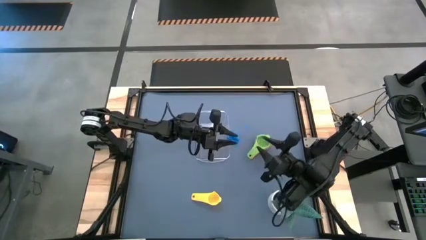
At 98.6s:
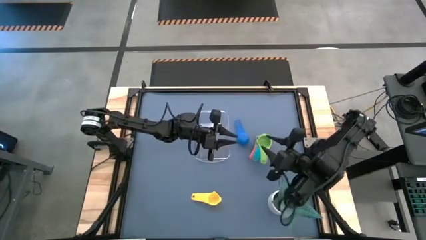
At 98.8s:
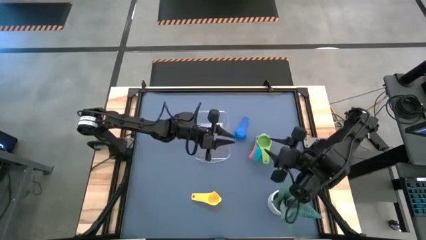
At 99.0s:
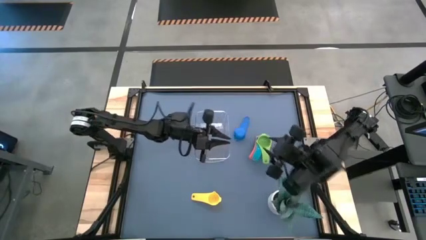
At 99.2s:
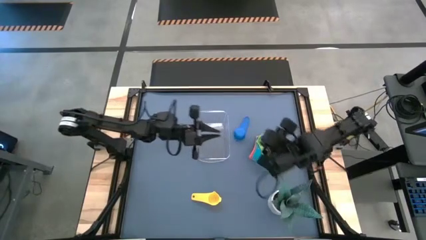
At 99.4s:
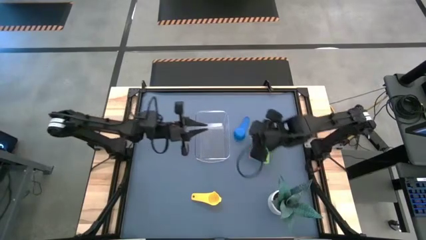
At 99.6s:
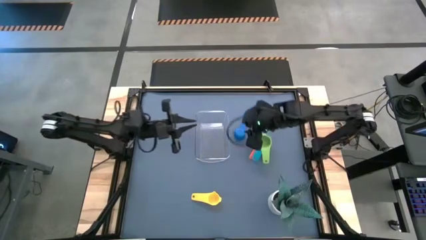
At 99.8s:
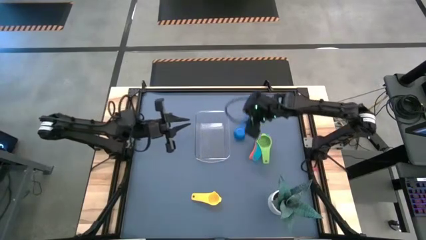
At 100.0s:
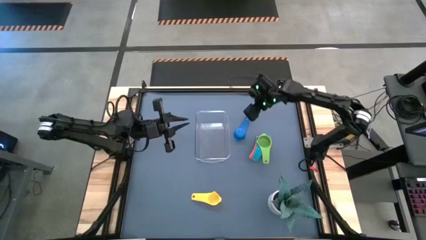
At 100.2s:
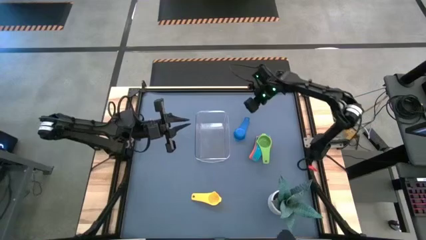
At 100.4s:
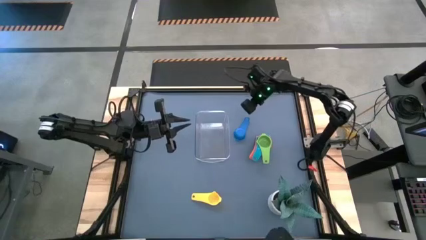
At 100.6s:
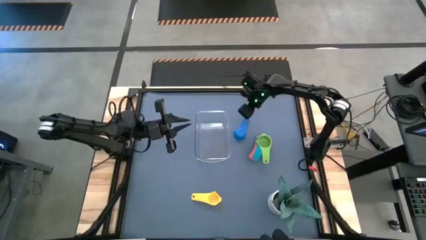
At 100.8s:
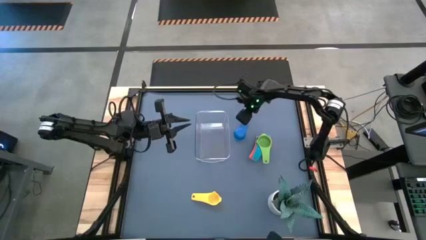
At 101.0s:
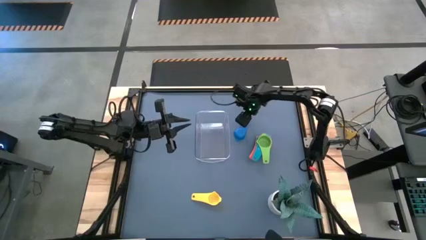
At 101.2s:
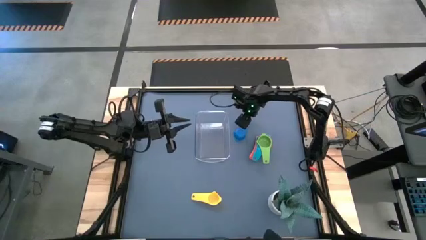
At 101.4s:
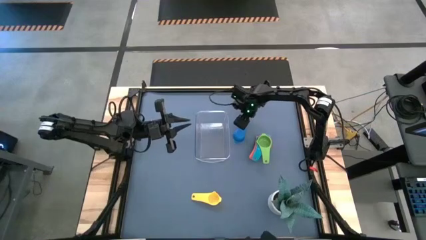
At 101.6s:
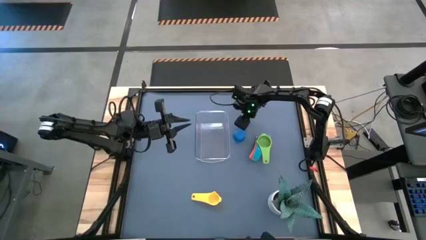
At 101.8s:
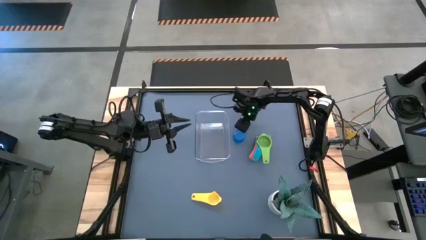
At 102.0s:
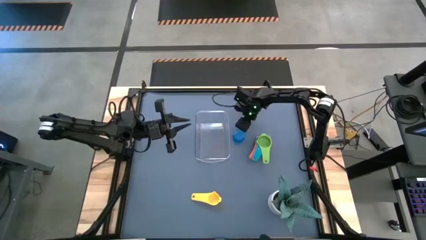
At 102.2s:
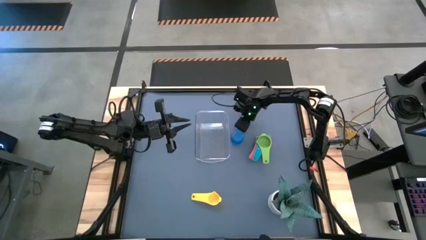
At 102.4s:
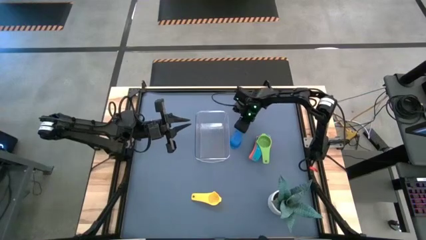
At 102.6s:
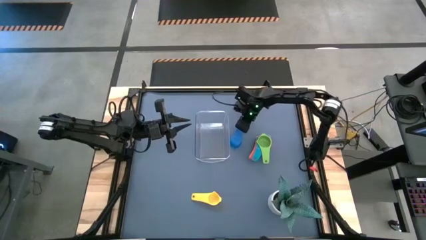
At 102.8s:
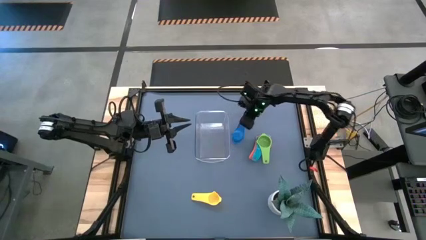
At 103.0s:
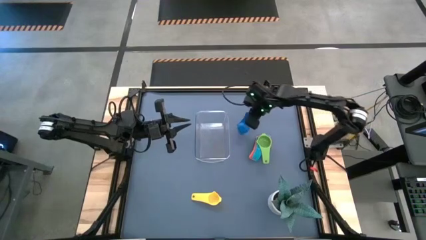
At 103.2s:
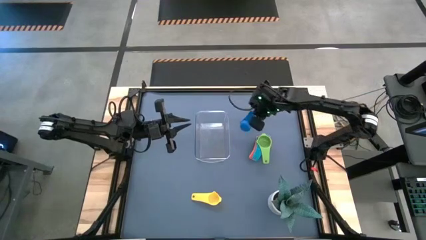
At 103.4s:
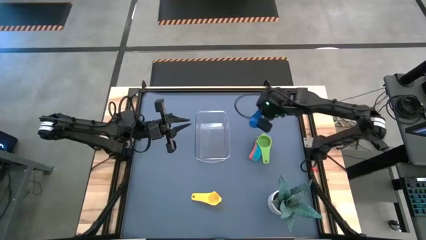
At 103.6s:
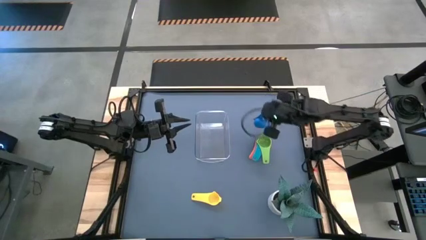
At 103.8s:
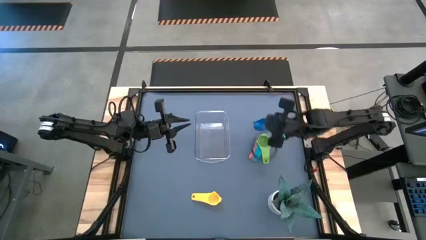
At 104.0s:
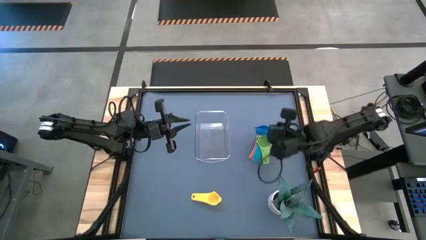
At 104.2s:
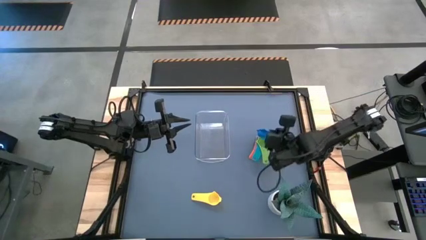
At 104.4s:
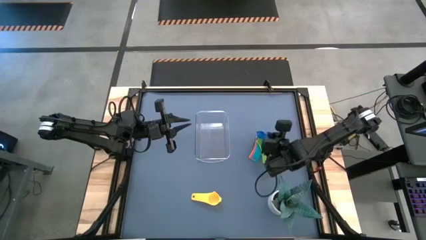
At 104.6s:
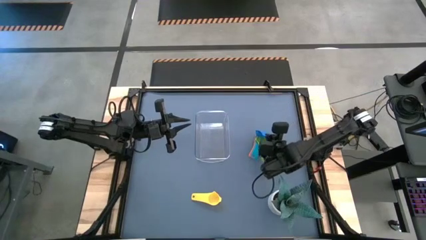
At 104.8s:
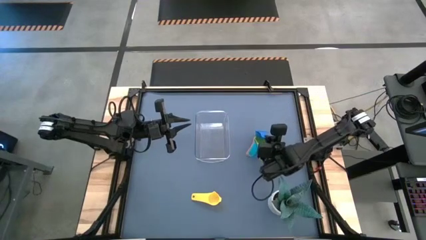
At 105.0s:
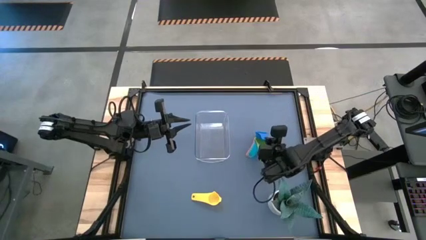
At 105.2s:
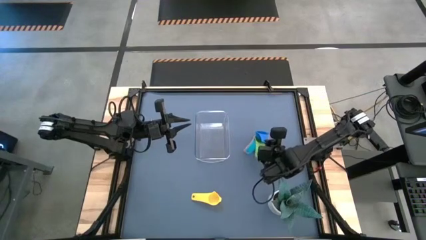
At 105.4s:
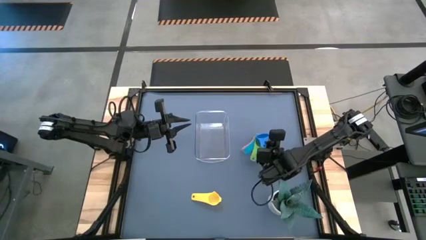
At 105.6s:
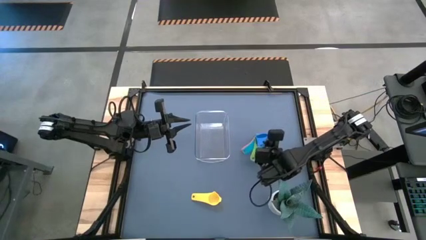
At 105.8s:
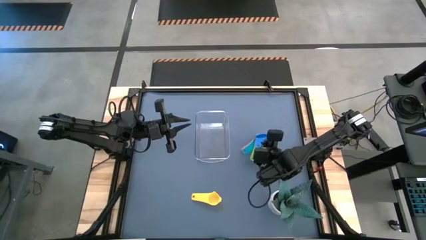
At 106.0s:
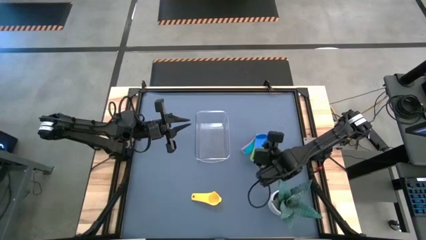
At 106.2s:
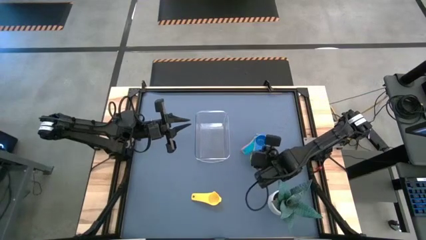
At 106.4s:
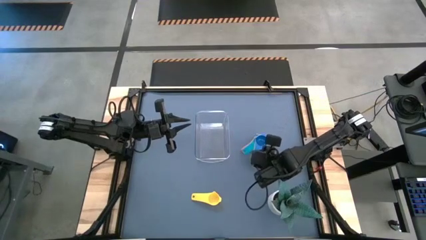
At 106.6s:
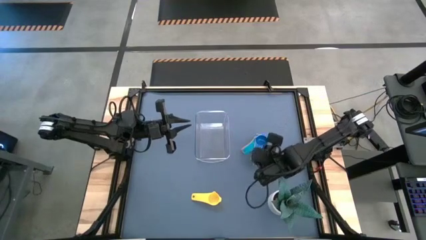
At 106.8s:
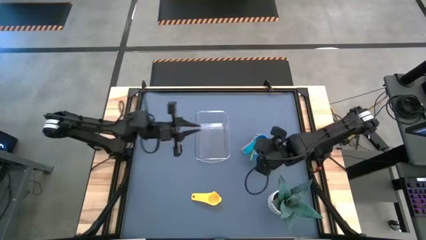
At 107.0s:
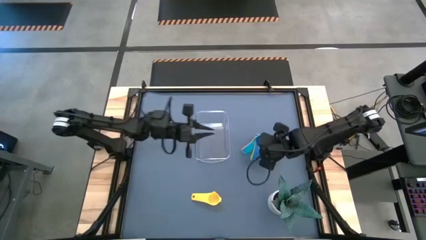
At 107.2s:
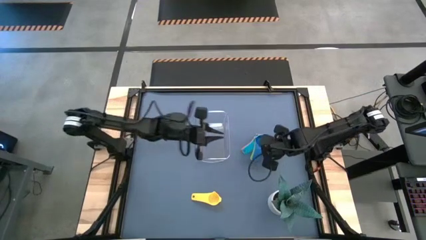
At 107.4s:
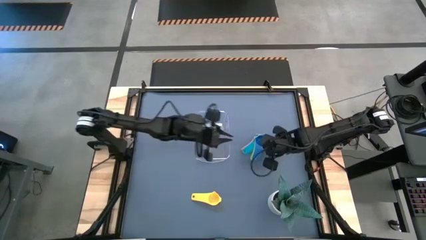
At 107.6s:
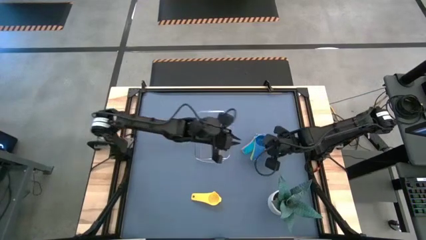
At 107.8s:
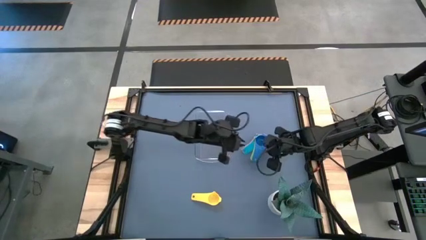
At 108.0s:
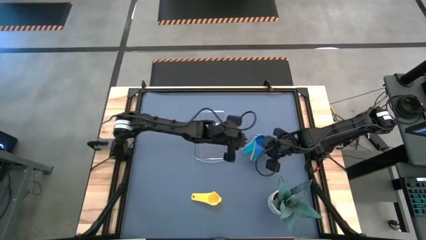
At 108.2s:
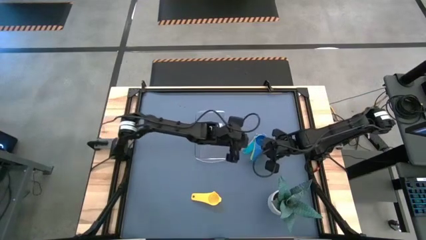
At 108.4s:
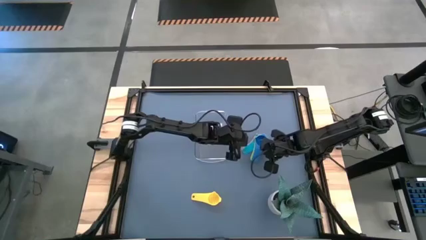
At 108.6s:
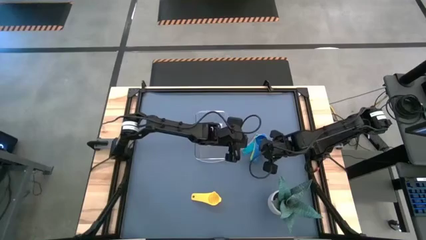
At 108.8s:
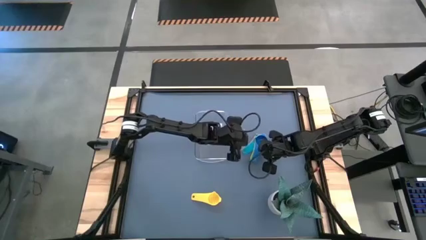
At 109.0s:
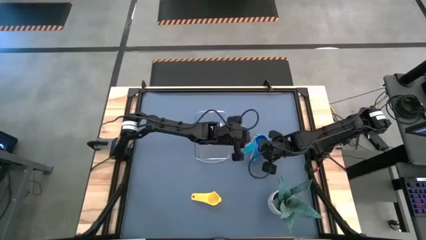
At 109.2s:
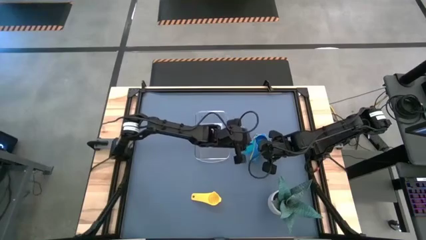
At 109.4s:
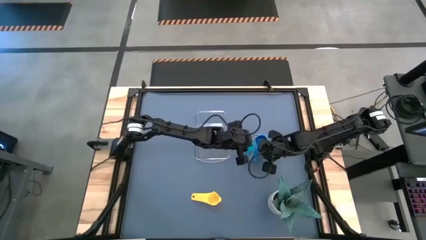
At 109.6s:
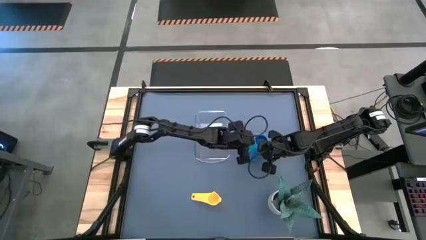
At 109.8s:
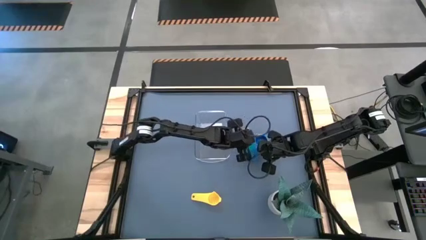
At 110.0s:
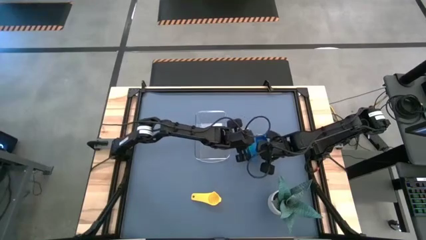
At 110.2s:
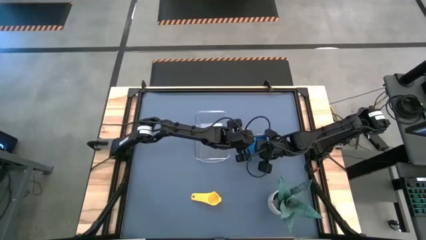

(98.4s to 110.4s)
Task: Nest measuring cups in basket
Stack the blue measuring cup on top of the green measuring cup

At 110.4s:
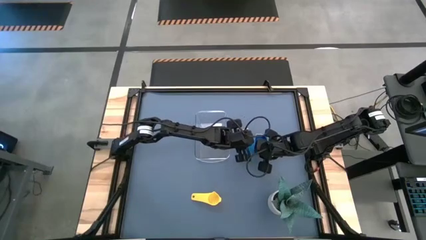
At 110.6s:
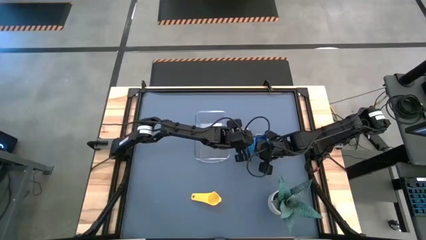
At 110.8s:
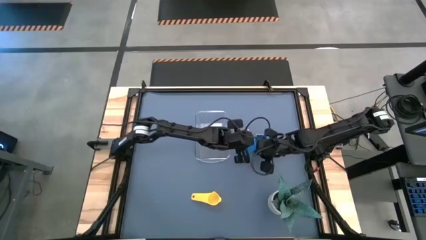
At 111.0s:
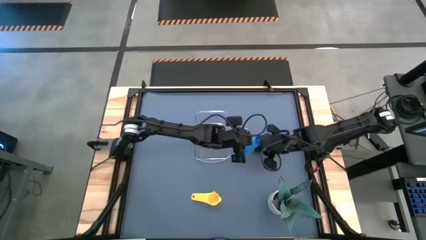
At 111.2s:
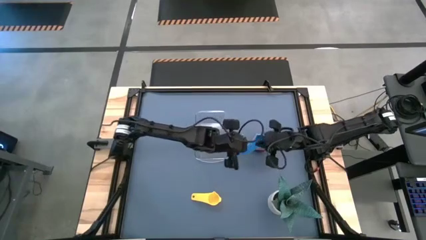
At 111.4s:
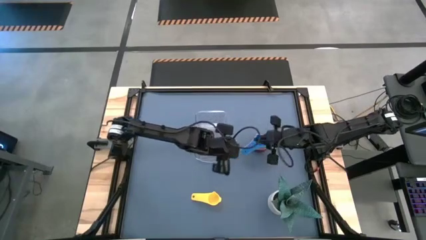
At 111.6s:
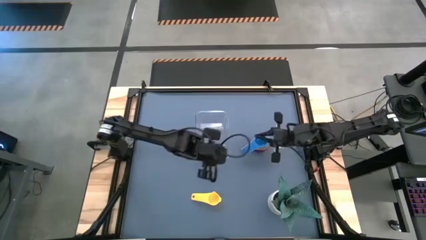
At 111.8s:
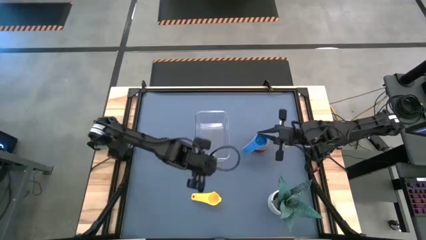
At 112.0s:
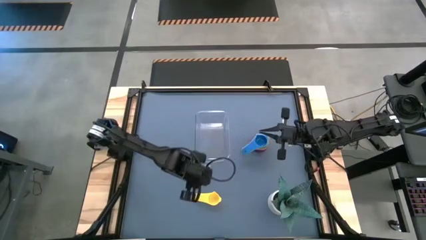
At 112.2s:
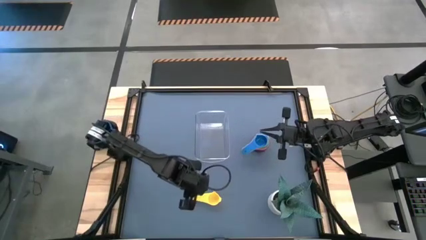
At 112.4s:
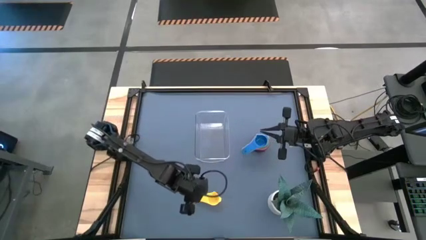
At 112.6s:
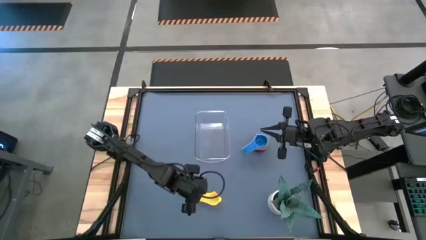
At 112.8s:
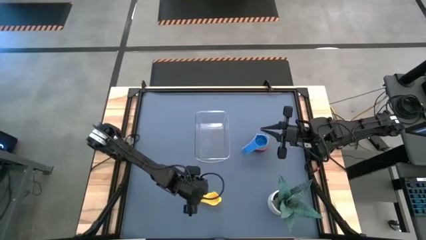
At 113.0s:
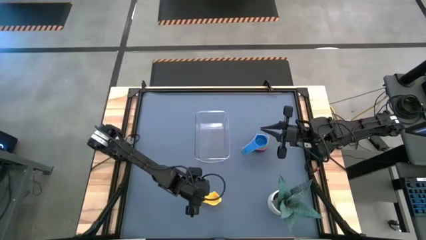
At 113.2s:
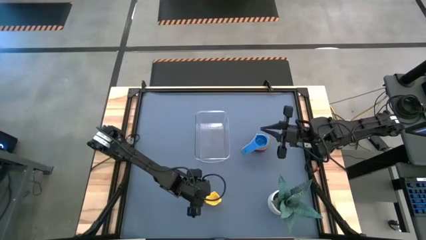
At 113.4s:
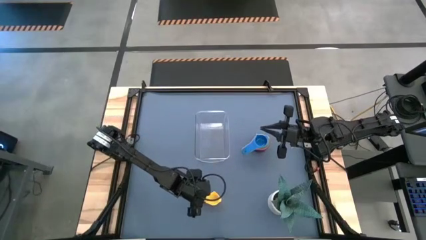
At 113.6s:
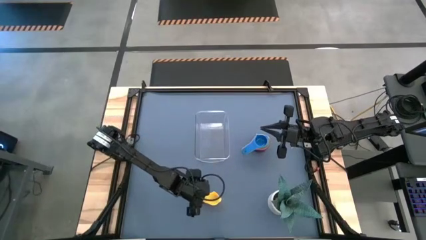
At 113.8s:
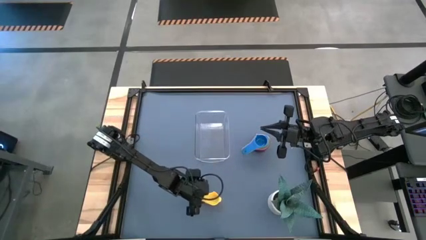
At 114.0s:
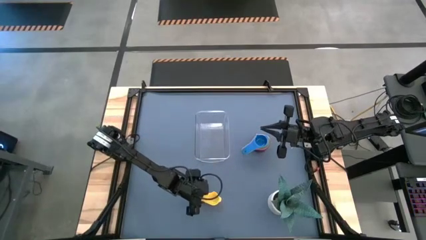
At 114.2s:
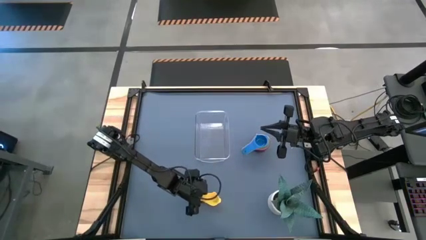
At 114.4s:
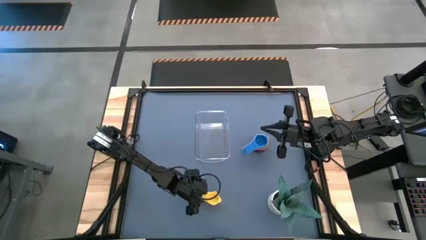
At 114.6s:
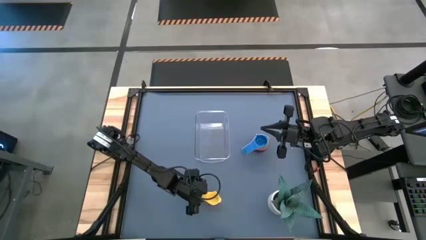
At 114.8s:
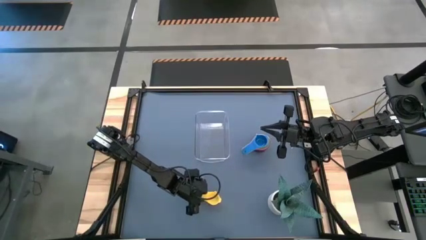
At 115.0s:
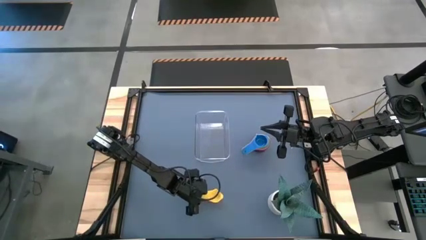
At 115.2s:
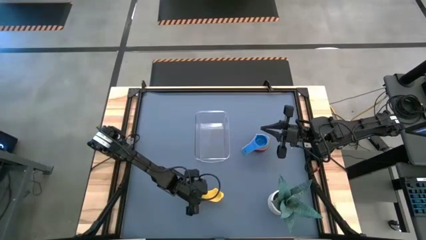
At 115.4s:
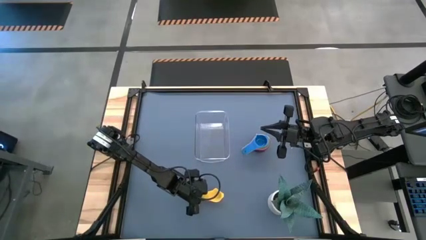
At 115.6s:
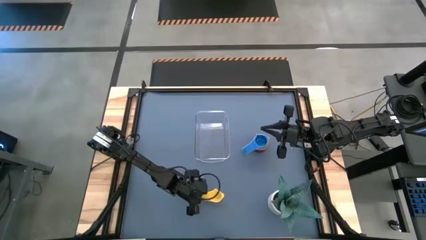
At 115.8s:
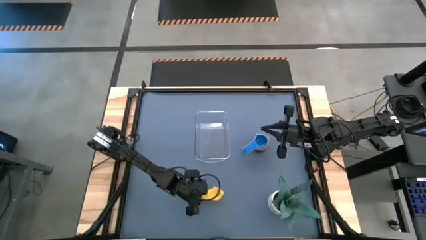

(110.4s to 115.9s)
Stack the yellow measuring cup on top of the blue measuring cup
